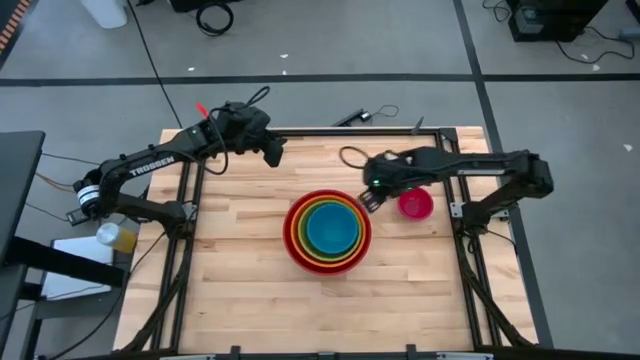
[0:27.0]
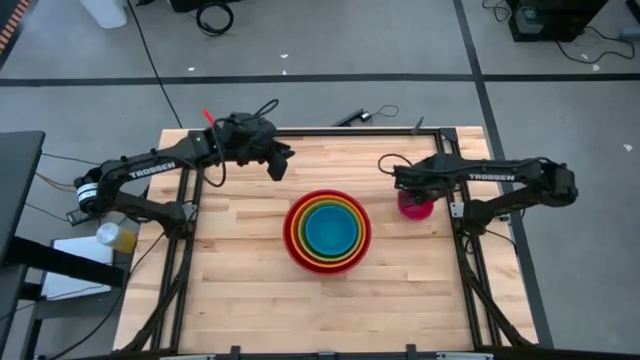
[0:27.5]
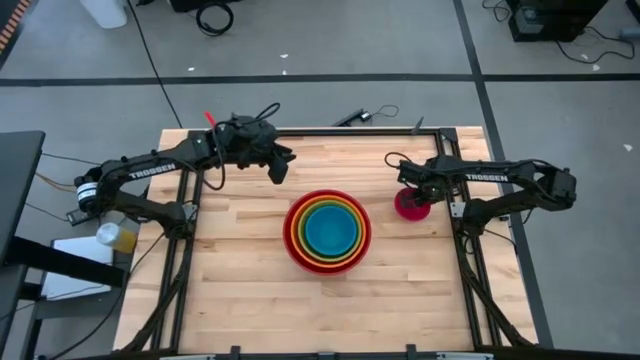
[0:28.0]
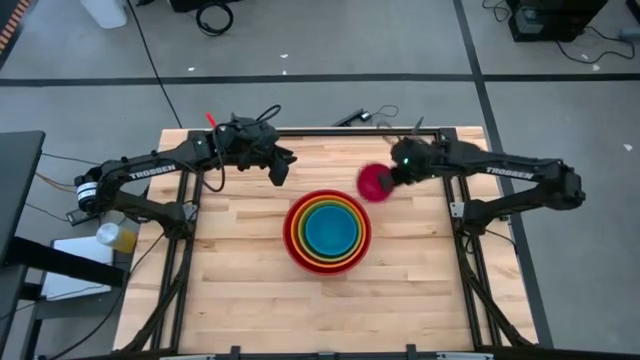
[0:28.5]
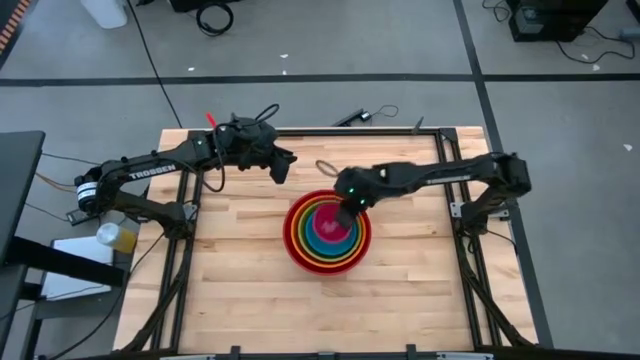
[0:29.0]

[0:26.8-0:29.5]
Stack the pink bowl on top of the blue bowl

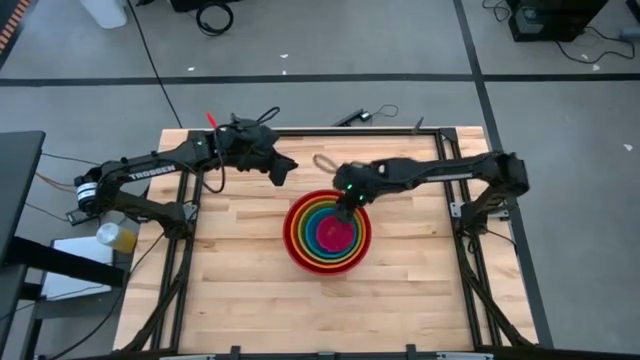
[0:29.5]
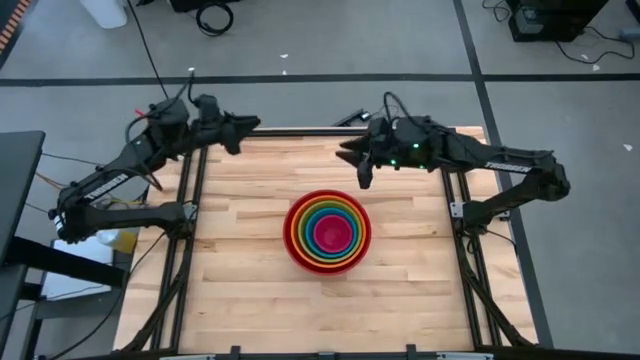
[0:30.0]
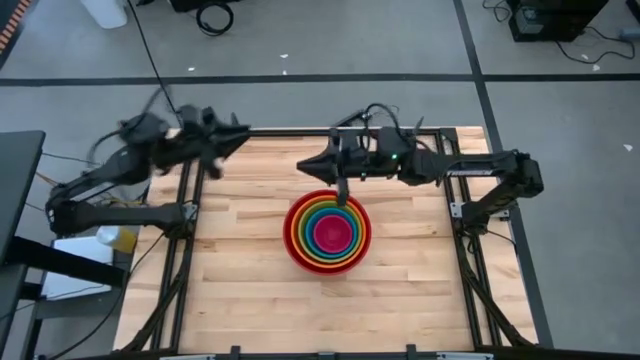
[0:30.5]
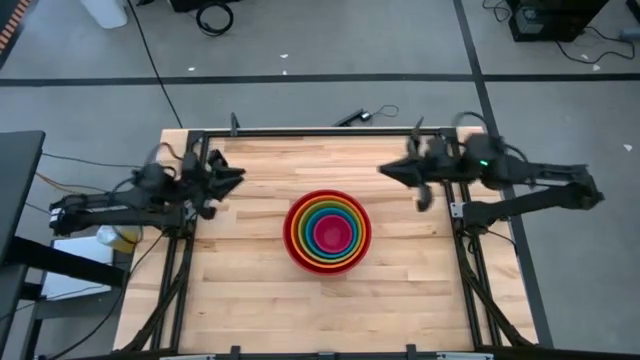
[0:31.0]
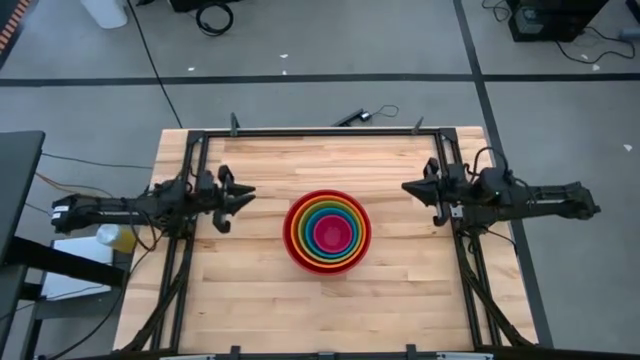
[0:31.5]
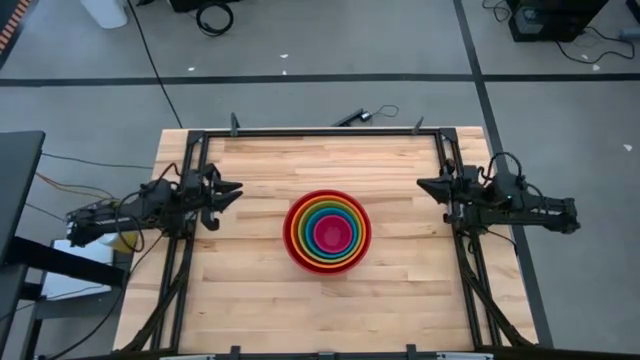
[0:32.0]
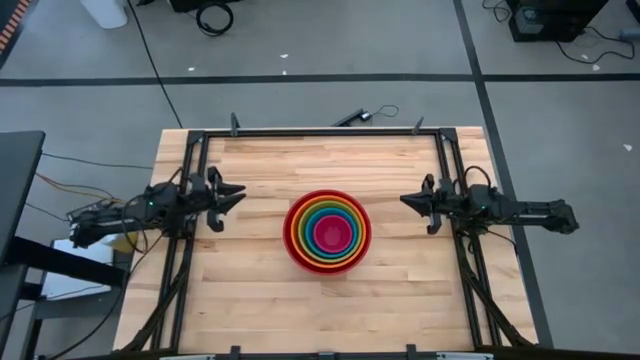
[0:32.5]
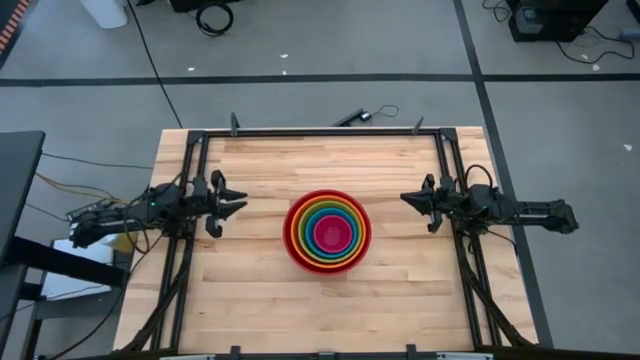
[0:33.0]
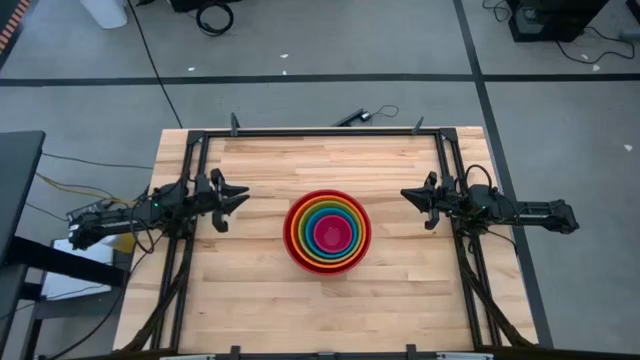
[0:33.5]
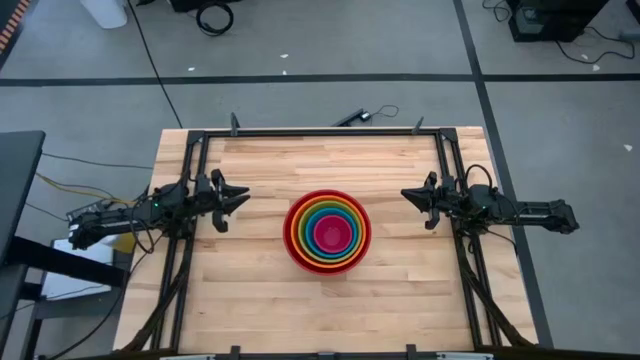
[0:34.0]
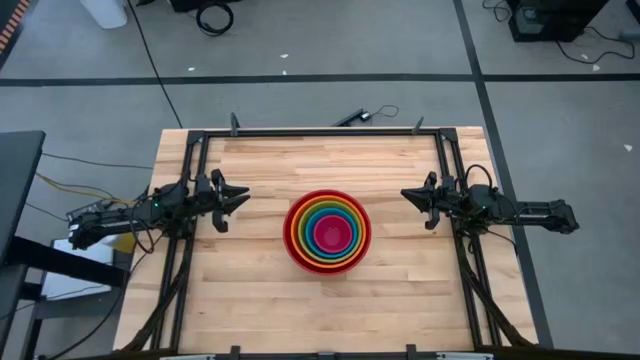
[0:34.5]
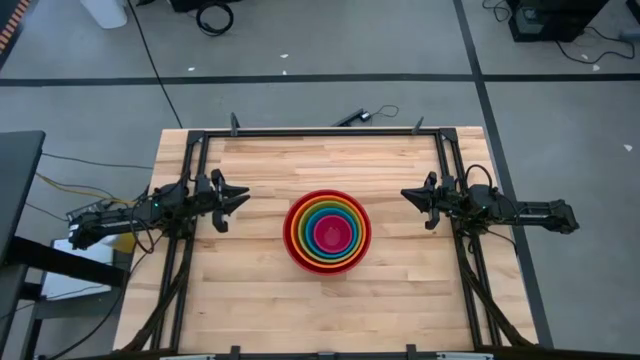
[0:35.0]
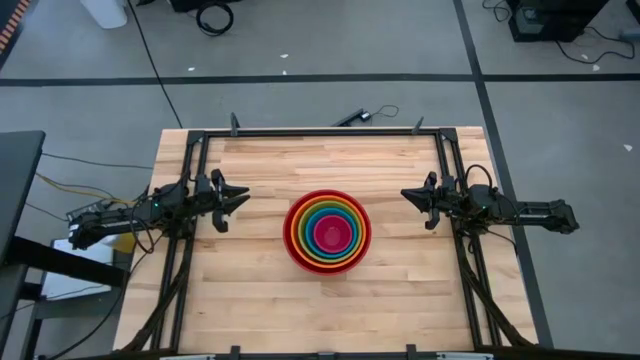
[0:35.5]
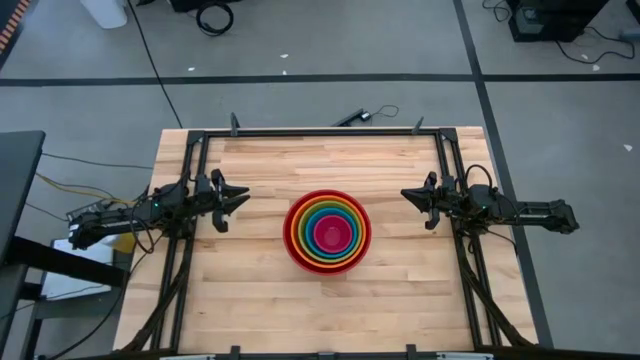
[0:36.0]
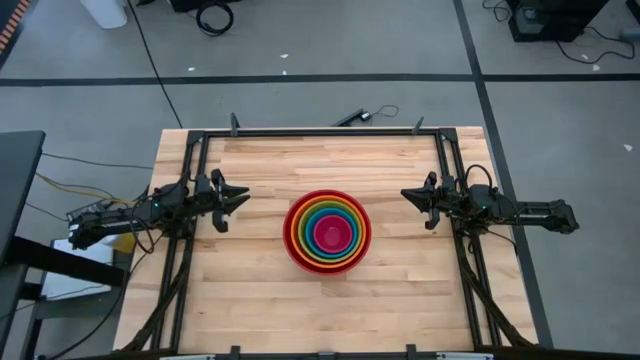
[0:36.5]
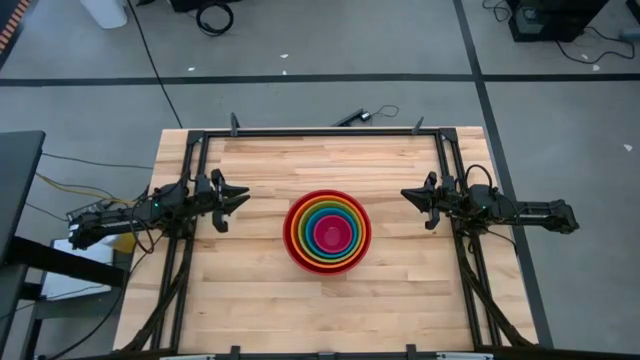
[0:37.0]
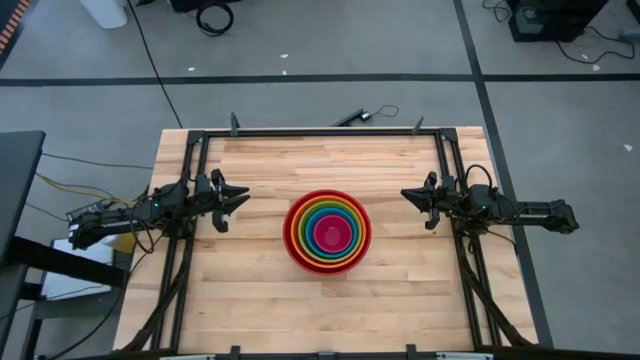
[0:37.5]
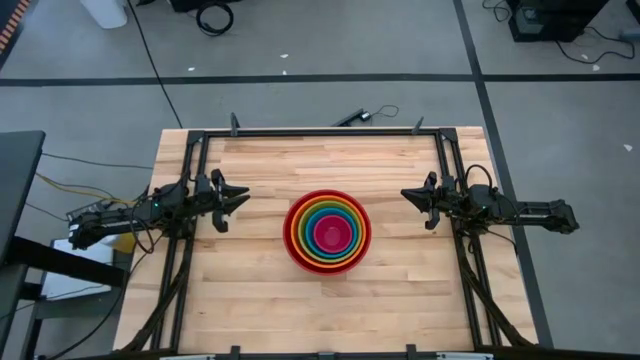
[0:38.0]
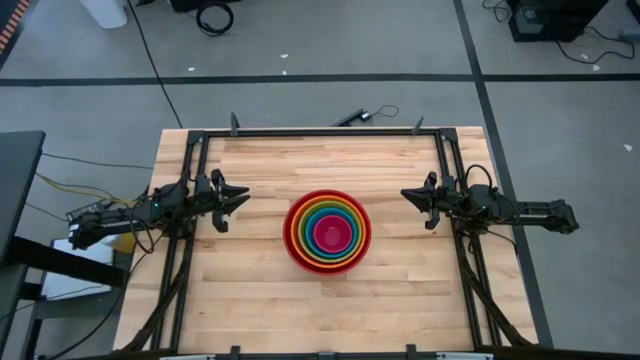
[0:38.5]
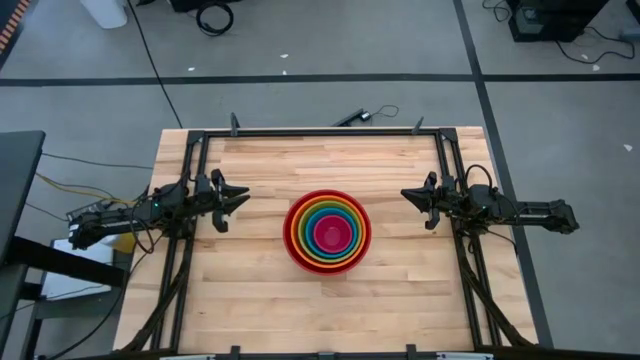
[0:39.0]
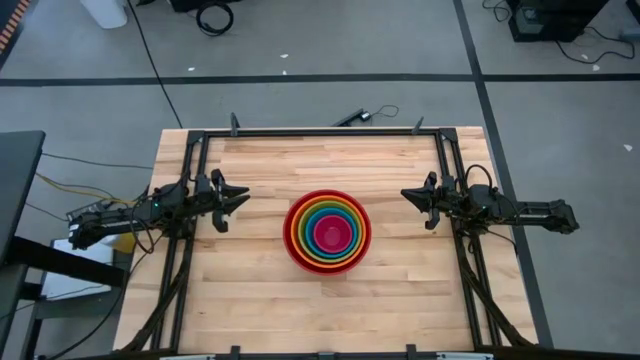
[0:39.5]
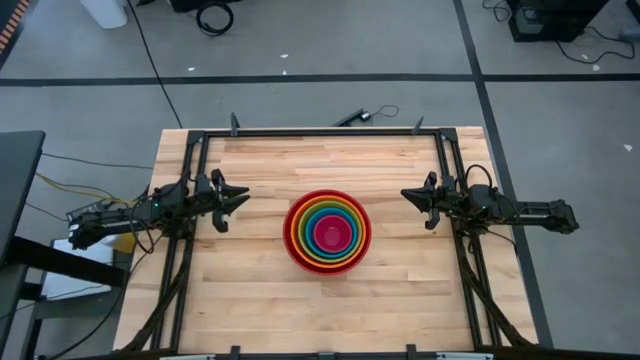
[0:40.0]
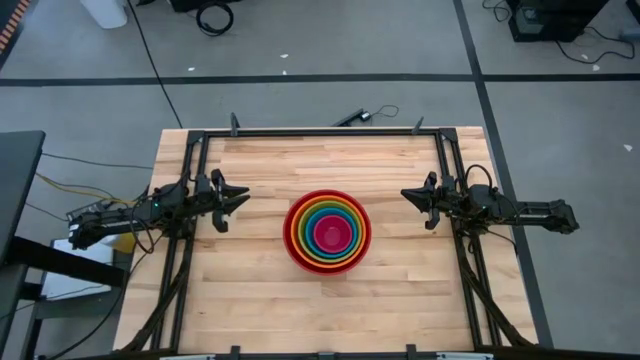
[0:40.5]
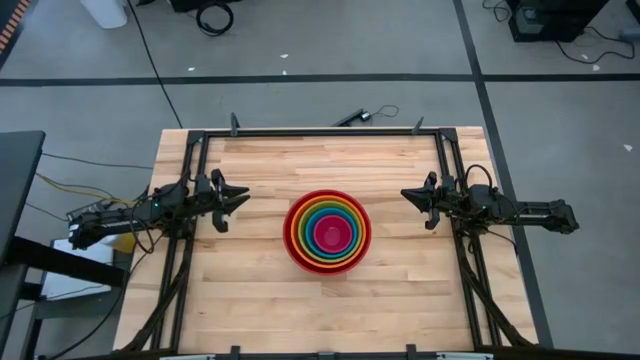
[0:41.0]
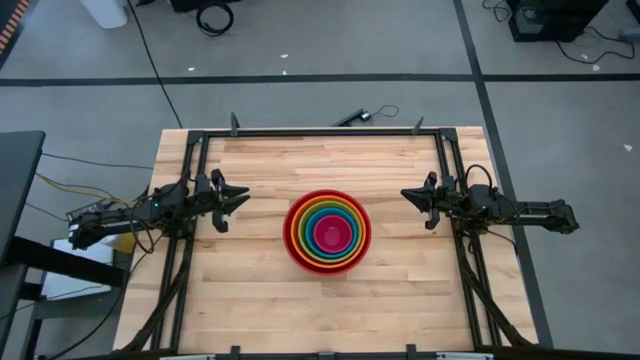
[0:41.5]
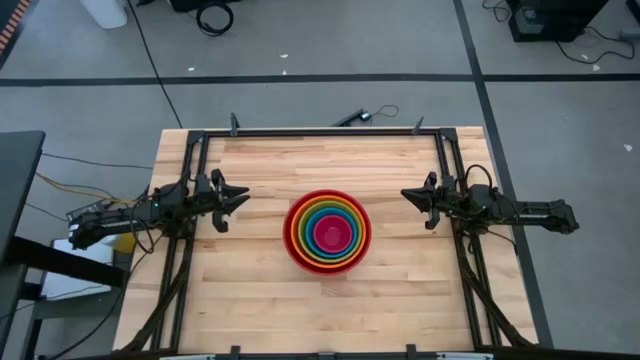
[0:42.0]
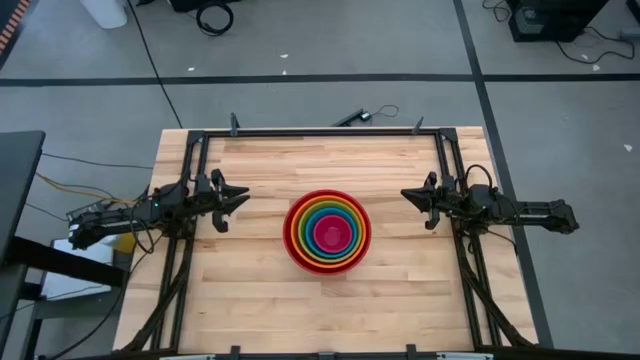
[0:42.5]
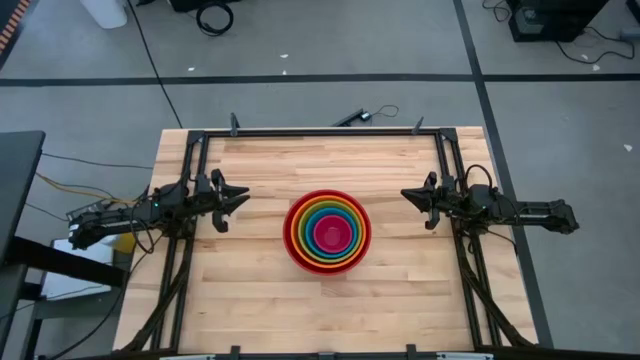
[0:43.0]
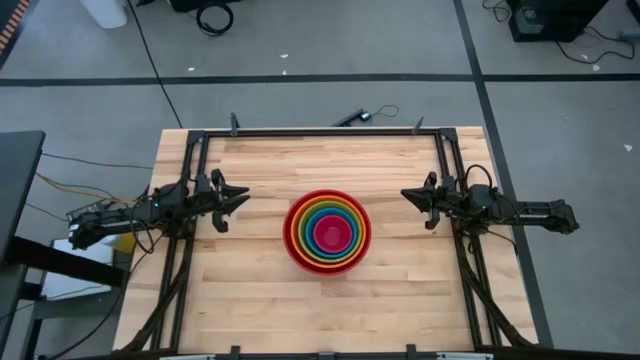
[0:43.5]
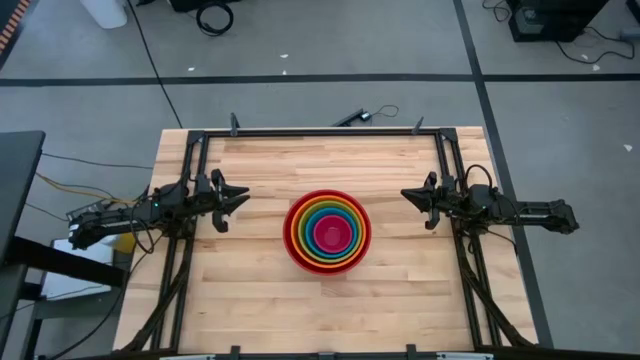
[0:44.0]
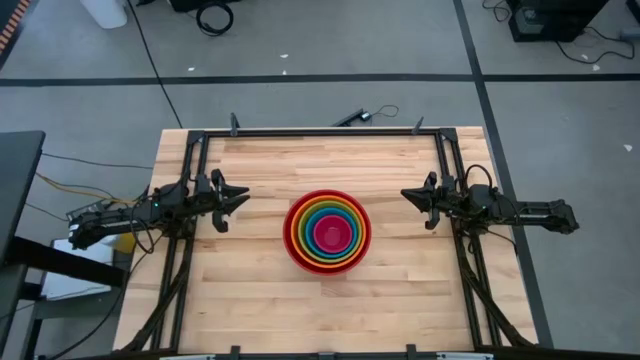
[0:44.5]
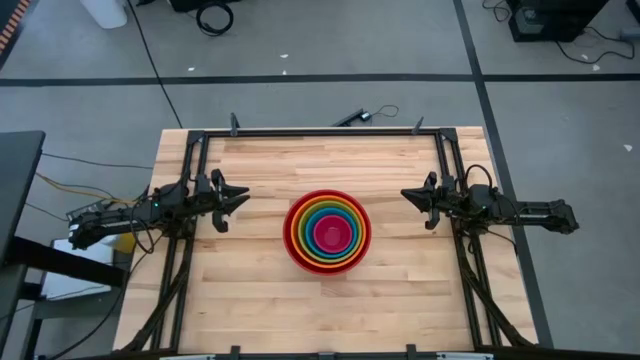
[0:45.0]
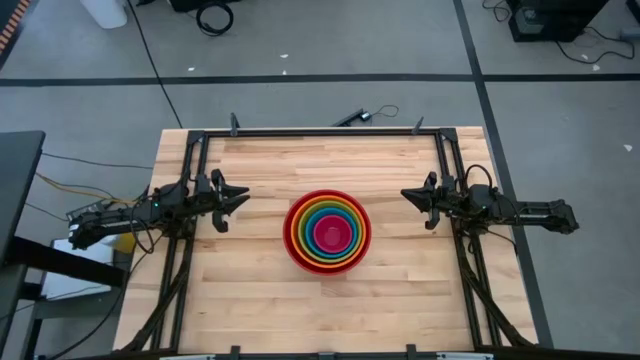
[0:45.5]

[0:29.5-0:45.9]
Return to Home Position
